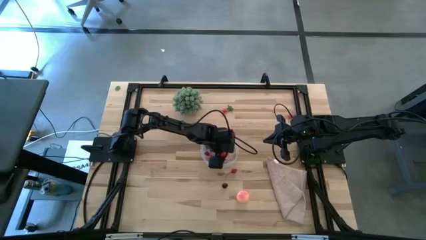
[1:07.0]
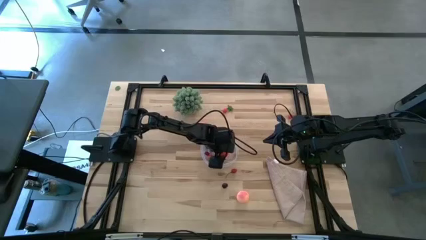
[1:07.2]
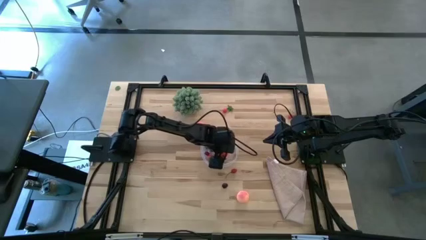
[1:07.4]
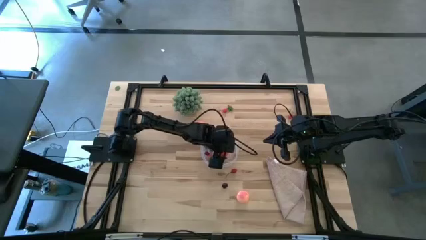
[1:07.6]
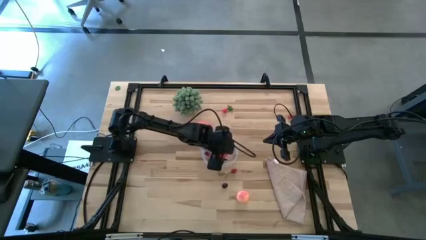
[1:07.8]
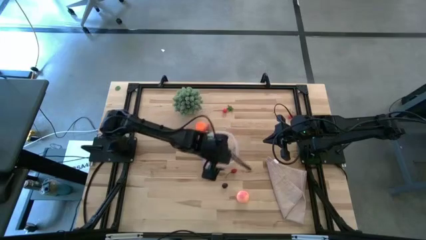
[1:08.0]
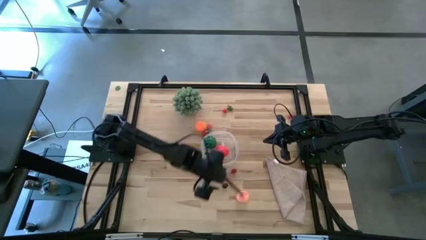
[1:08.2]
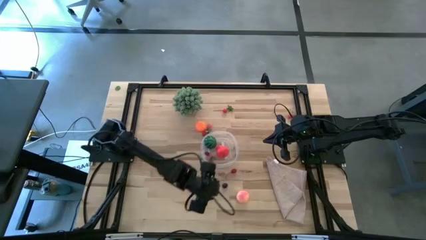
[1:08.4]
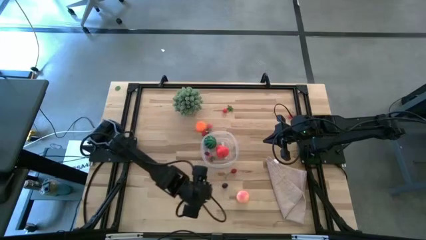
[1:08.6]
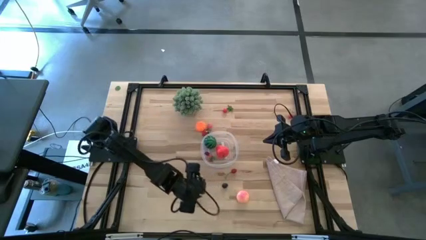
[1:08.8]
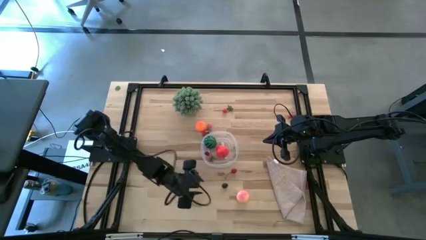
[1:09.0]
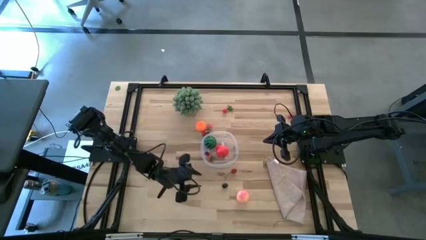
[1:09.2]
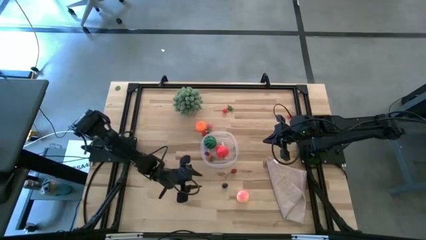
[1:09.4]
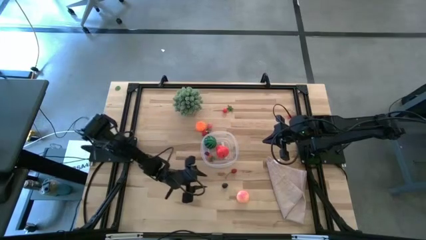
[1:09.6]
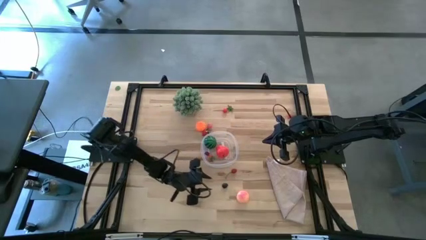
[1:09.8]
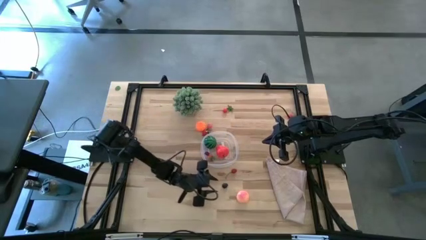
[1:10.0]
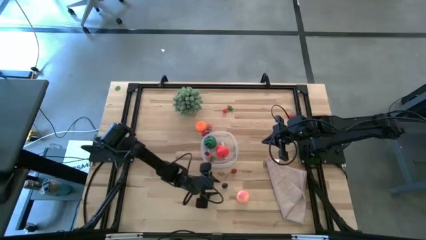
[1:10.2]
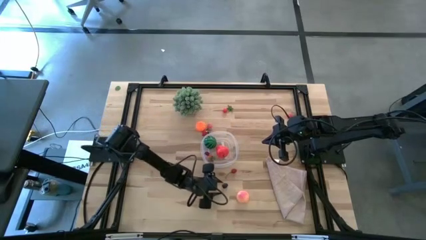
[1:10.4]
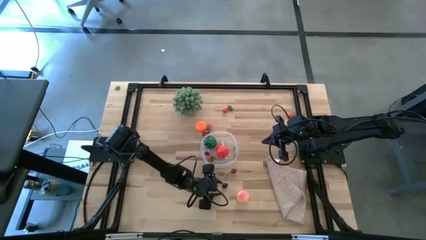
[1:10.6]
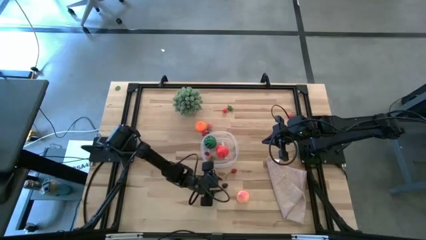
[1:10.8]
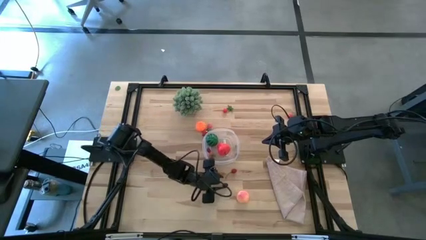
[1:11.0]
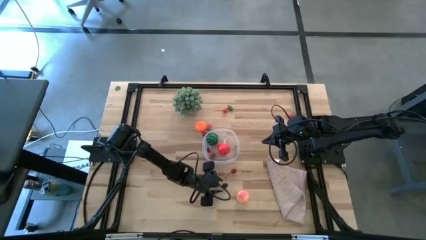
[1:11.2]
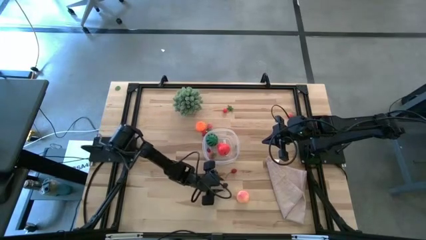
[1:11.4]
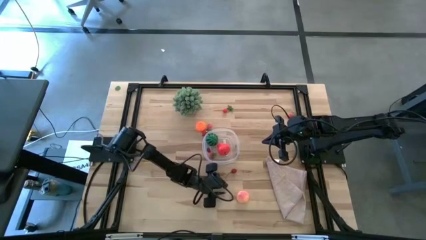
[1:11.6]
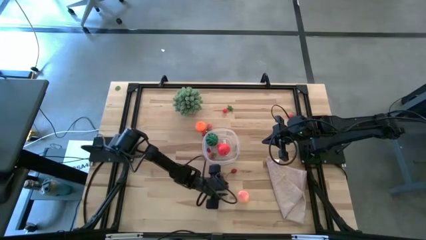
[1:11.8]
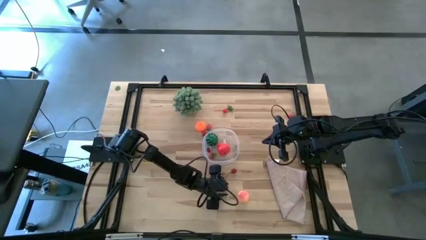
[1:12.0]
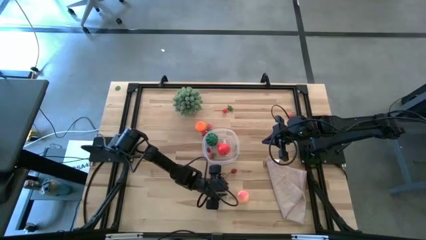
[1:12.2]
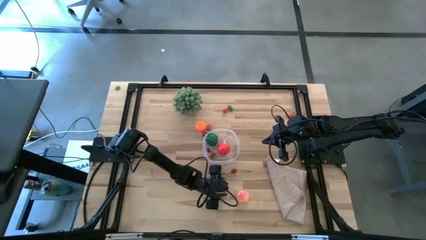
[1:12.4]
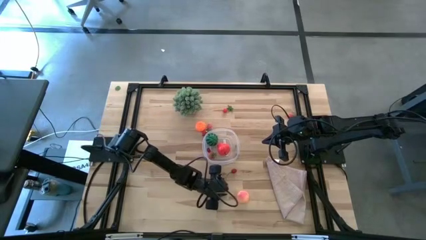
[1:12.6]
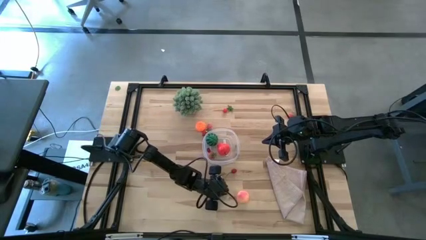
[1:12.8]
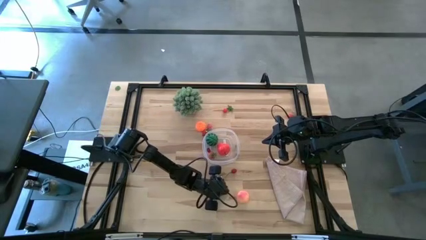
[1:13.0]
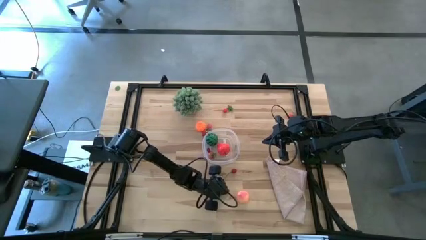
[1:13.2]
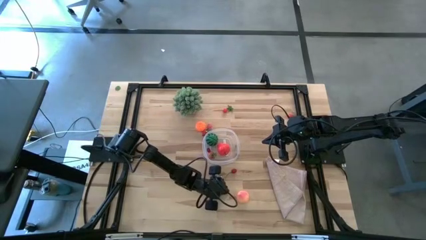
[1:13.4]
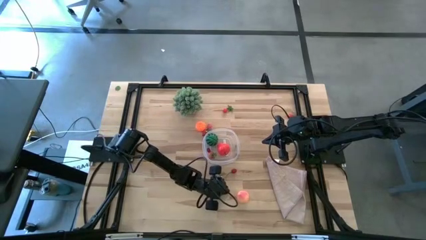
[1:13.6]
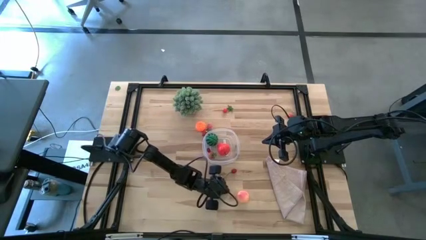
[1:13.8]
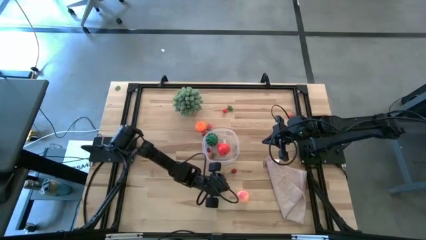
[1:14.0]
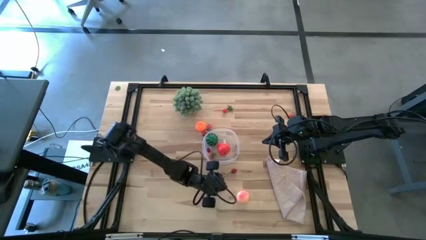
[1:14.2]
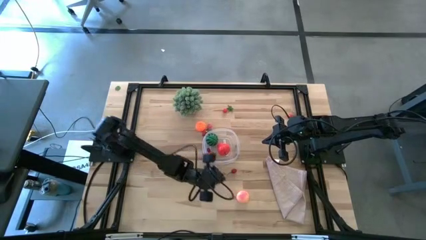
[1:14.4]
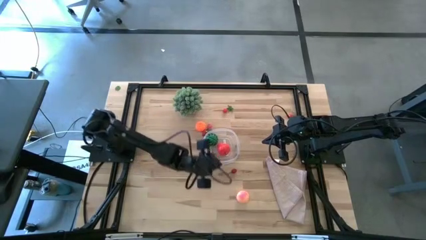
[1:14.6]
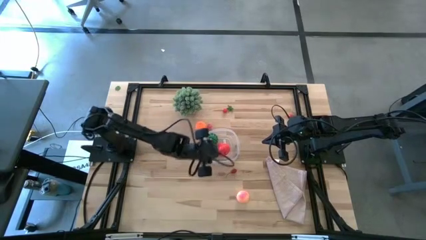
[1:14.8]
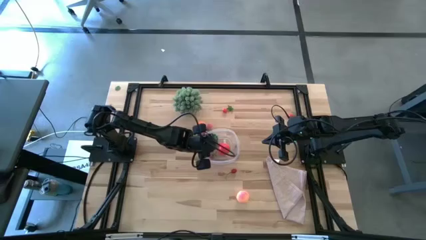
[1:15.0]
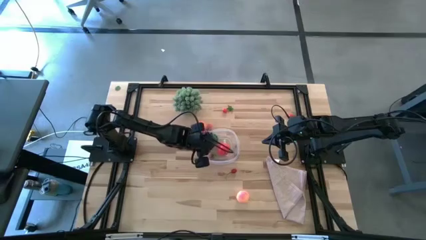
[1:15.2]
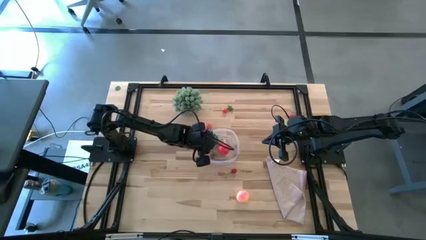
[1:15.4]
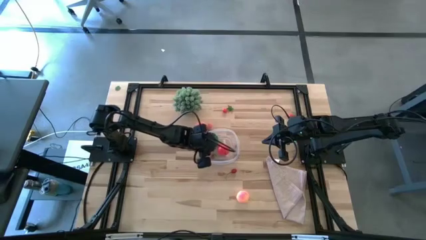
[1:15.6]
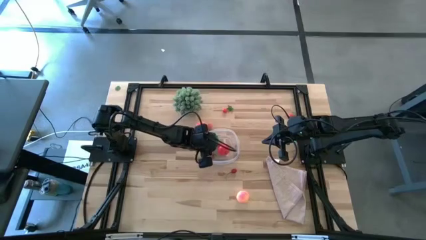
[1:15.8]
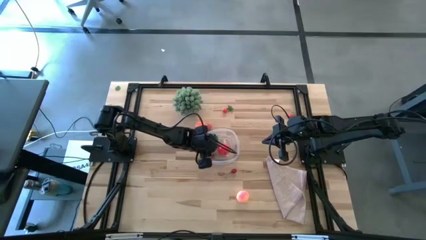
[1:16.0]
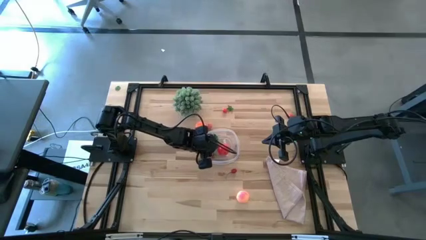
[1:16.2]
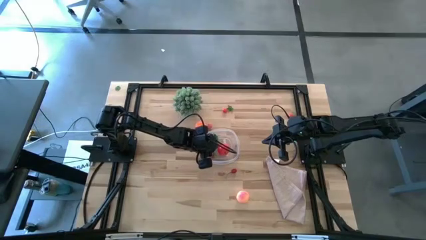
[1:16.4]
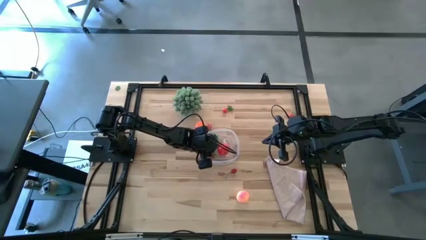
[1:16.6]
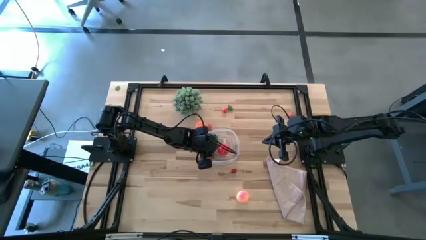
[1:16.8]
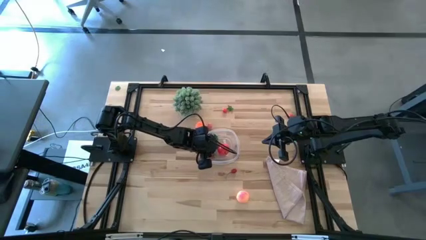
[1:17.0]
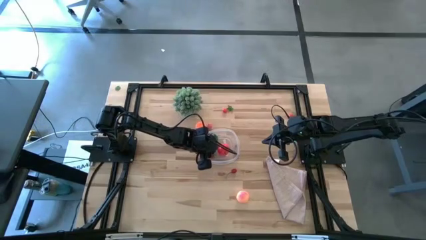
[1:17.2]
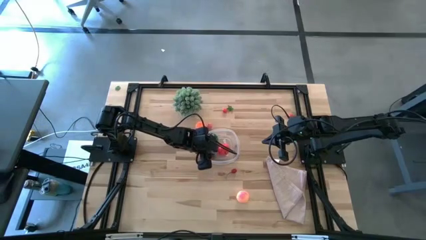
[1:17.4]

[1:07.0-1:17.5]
Task: Pick and placing Produce into tupperware
Put the blackberry into the transparent container

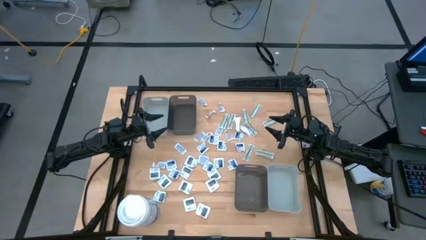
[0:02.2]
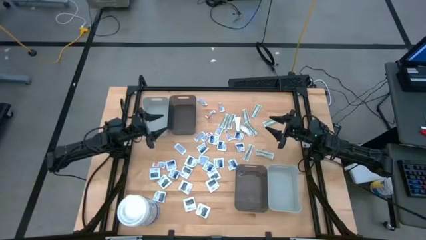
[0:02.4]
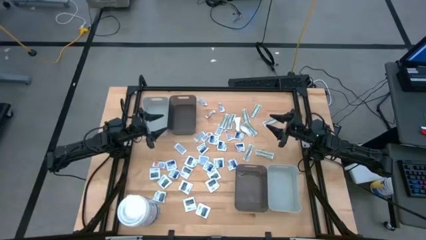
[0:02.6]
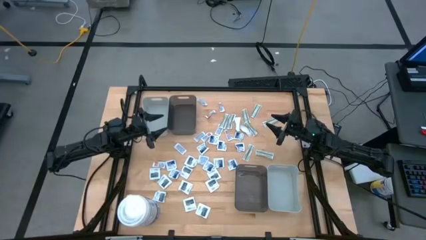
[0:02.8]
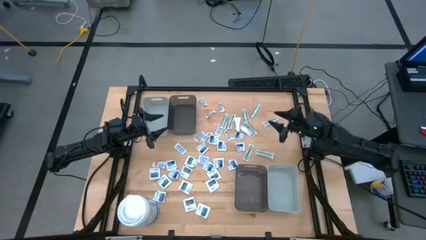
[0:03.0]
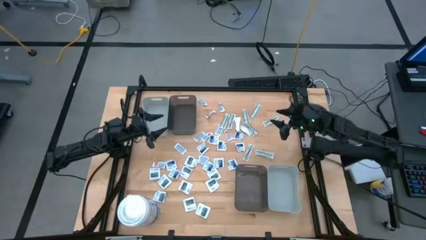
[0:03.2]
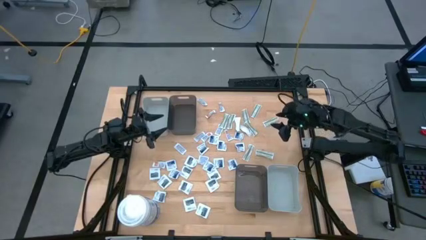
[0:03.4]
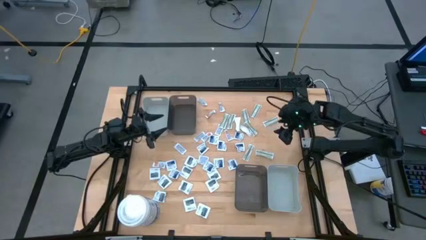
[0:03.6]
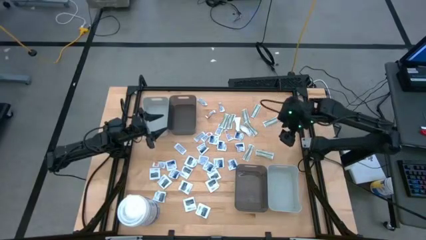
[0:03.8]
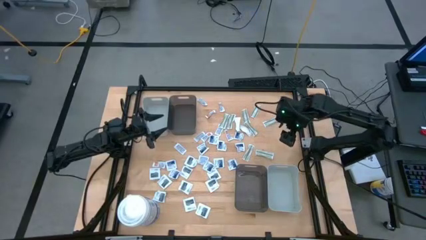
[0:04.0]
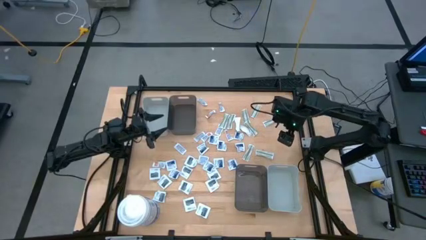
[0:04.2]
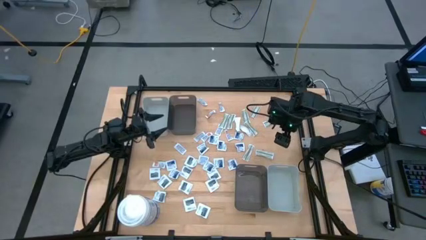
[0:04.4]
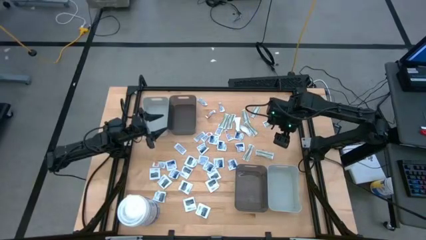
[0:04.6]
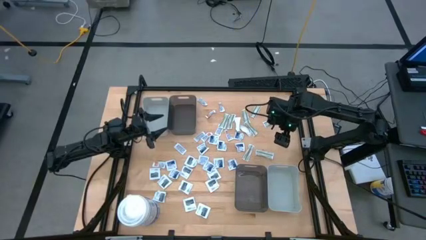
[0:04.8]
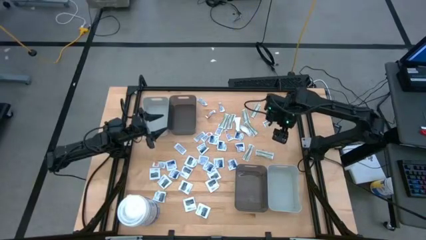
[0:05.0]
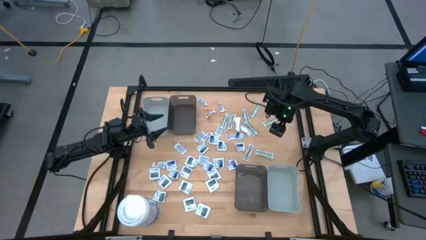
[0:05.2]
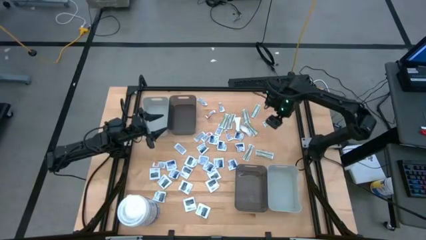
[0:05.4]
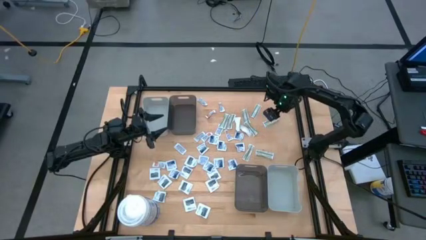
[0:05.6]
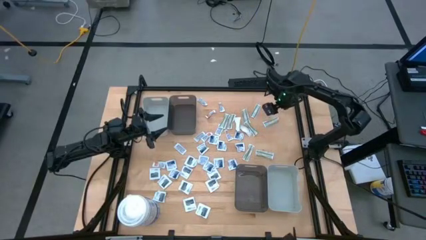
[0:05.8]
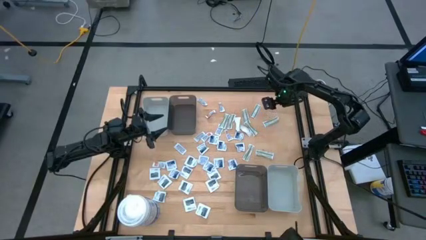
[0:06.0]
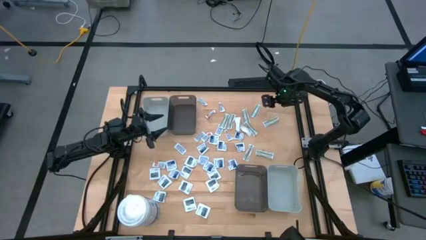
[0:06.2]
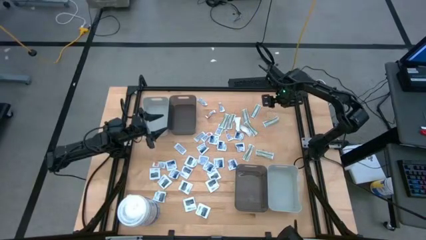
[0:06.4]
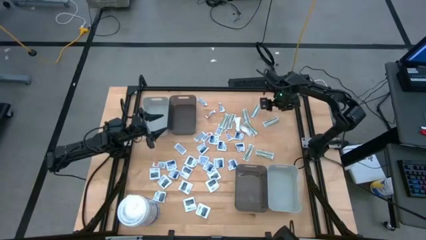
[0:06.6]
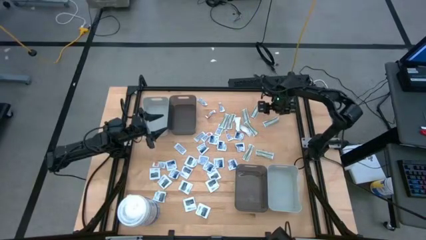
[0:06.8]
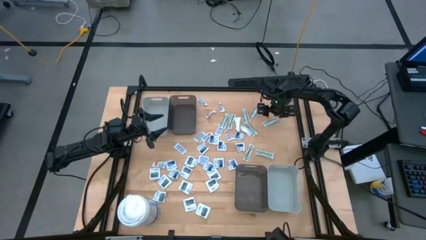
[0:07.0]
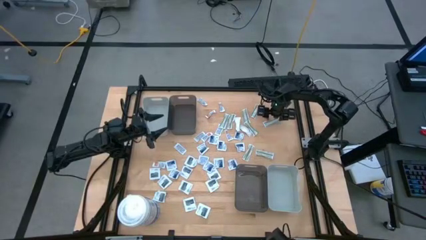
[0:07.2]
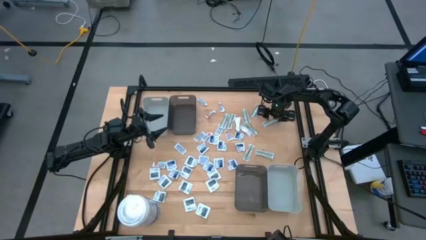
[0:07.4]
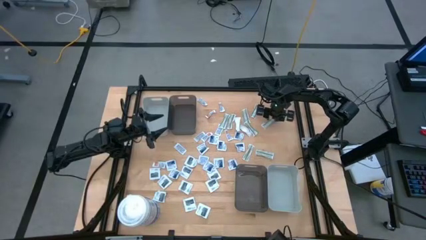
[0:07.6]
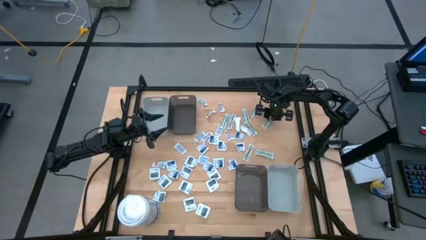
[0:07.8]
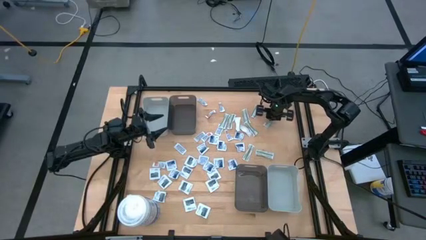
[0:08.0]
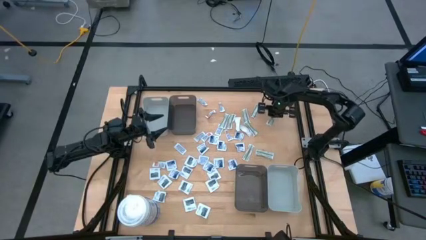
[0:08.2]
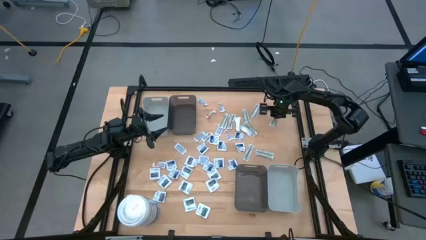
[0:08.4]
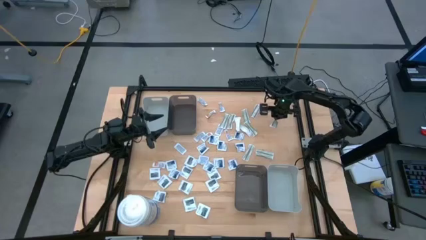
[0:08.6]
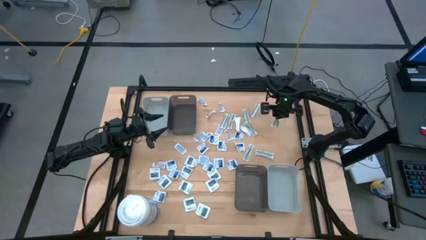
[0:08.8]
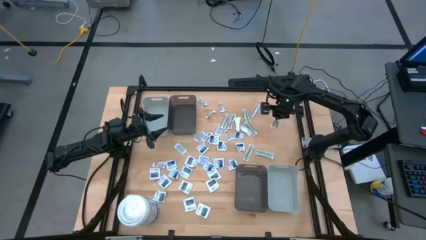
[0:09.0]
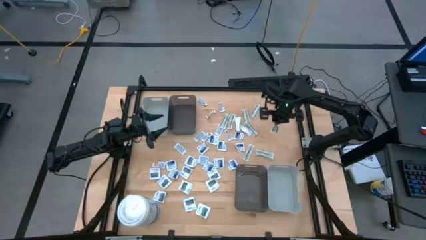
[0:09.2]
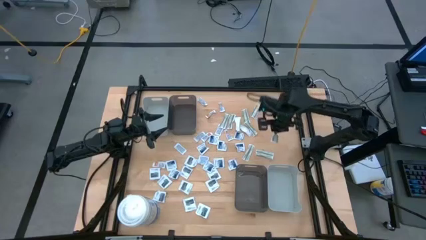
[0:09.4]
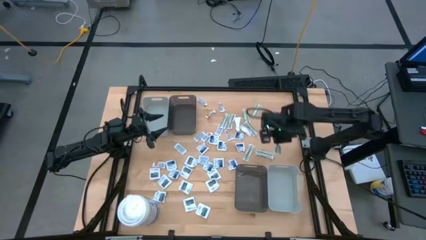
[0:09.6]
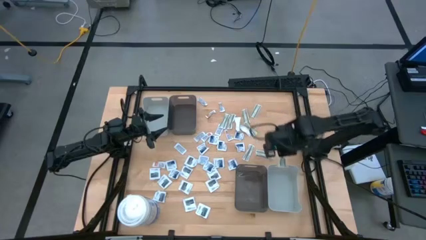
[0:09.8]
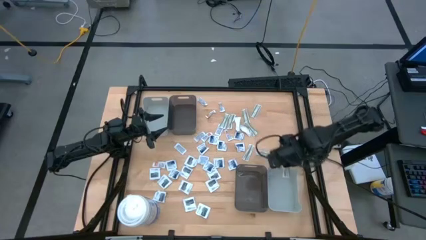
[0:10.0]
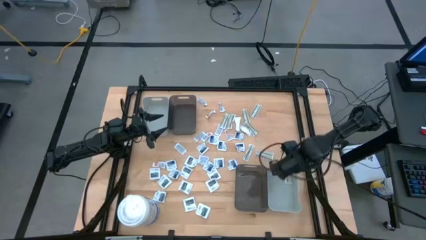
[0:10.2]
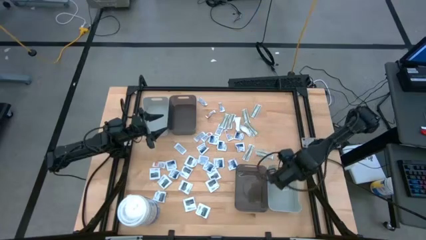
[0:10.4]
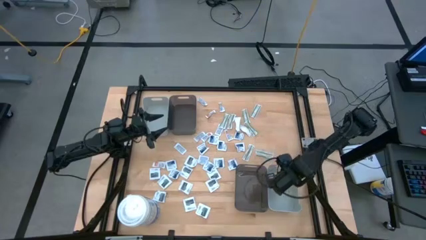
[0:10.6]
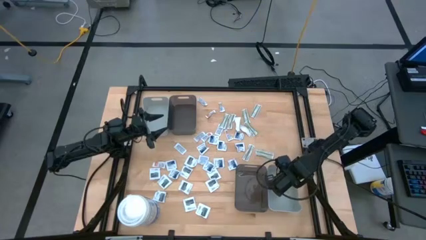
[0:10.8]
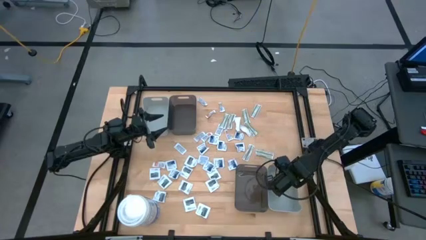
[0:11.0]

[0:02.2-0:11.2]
Task: Pick & Place First Aid Supplies
Put the white bandage pack into the bottom gray bin
